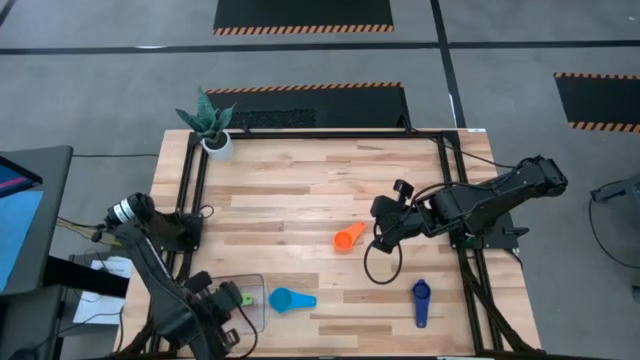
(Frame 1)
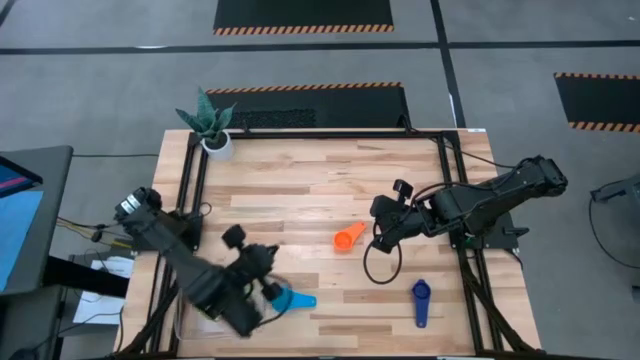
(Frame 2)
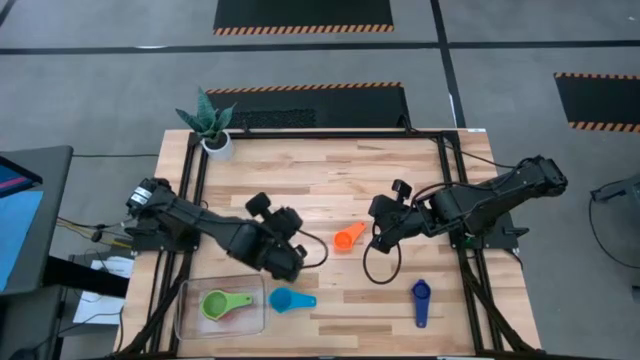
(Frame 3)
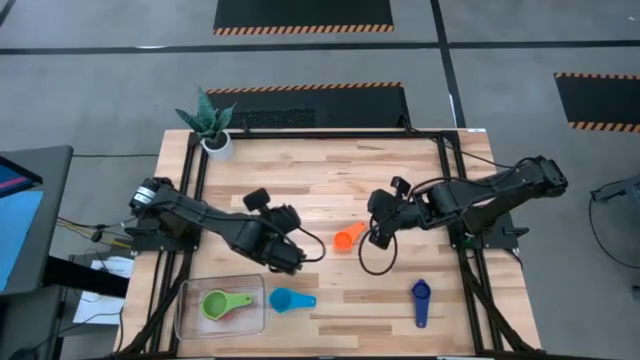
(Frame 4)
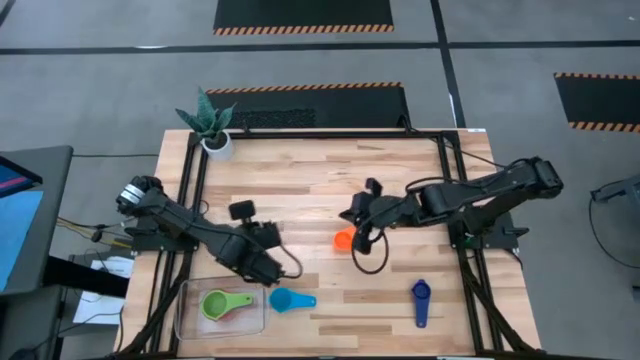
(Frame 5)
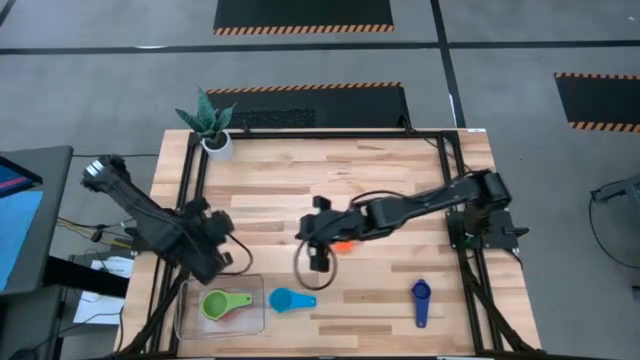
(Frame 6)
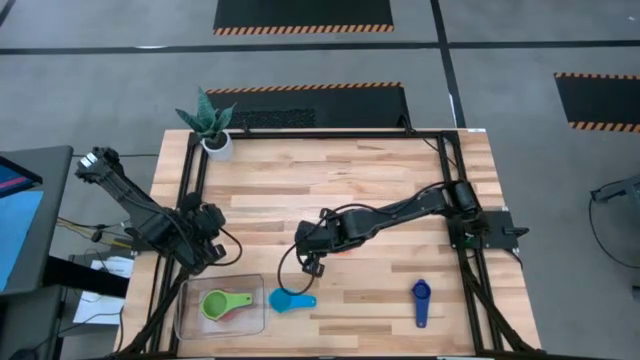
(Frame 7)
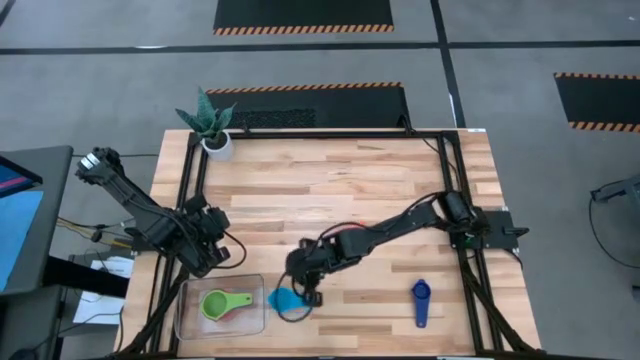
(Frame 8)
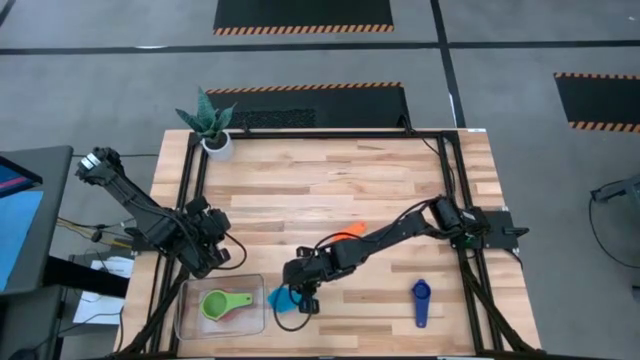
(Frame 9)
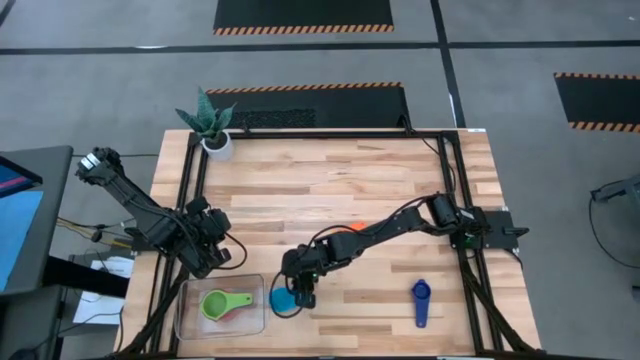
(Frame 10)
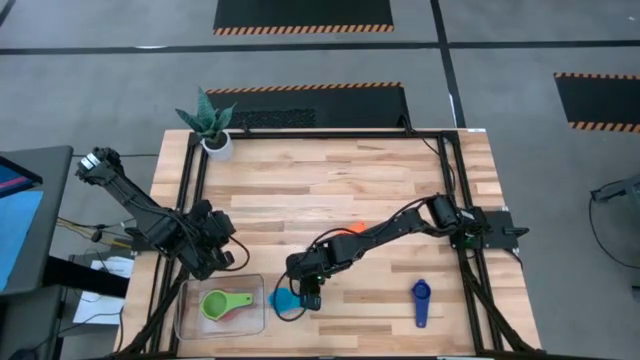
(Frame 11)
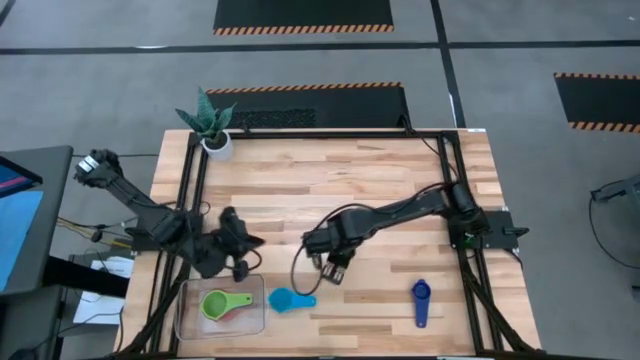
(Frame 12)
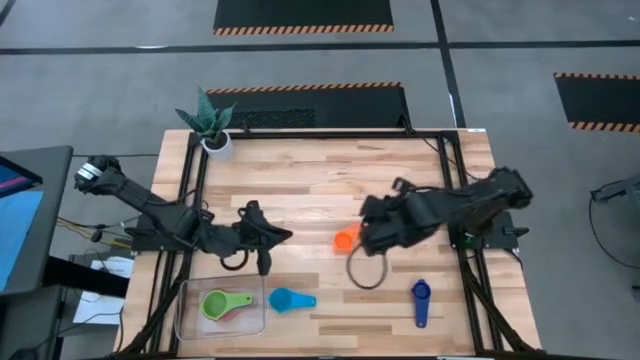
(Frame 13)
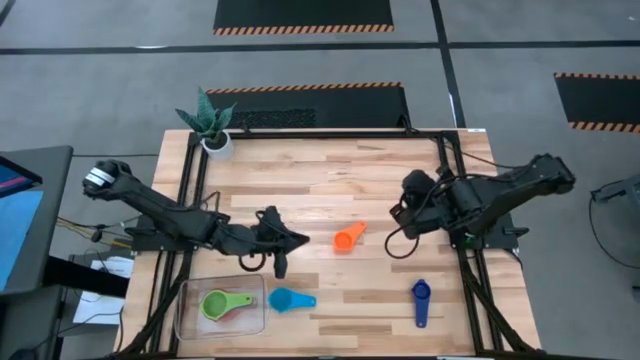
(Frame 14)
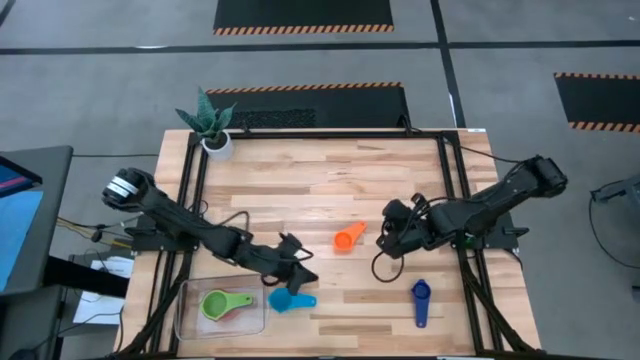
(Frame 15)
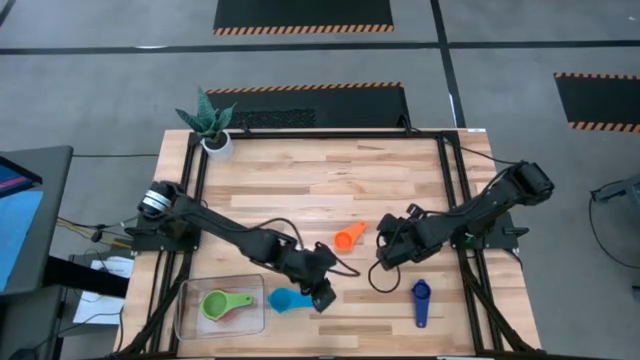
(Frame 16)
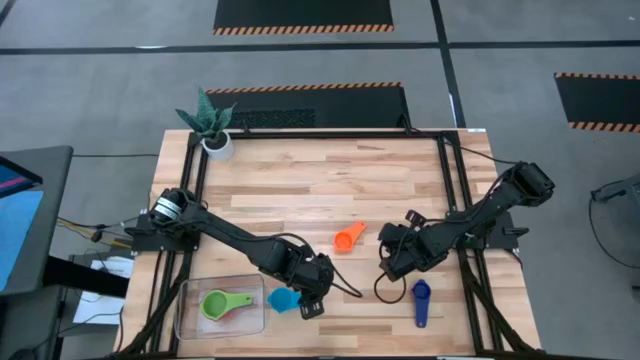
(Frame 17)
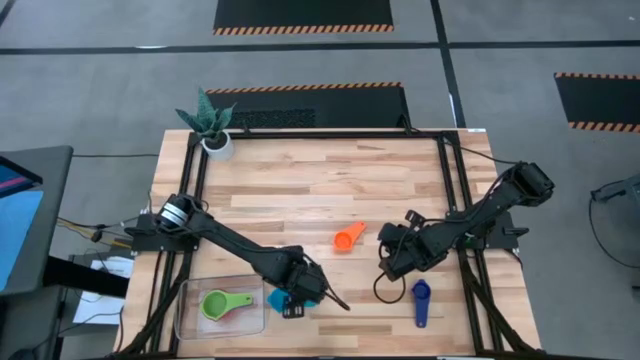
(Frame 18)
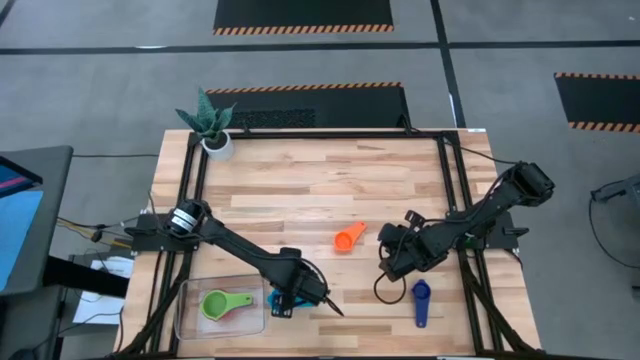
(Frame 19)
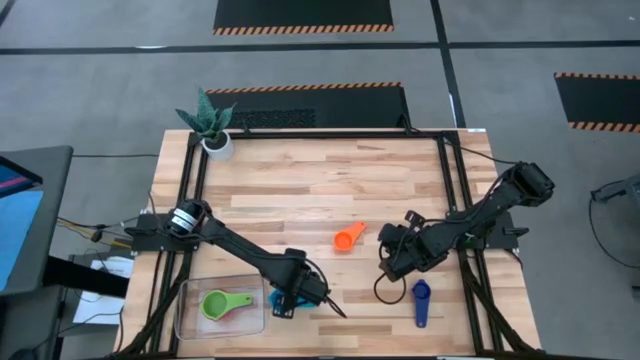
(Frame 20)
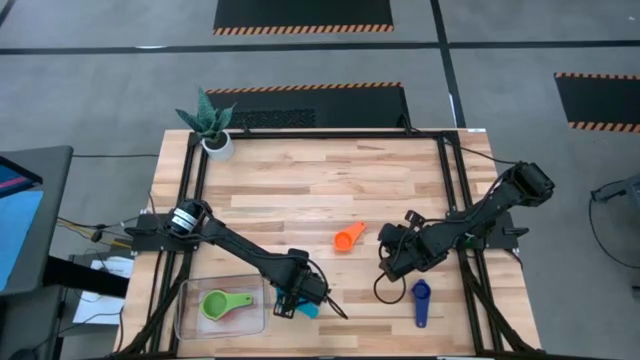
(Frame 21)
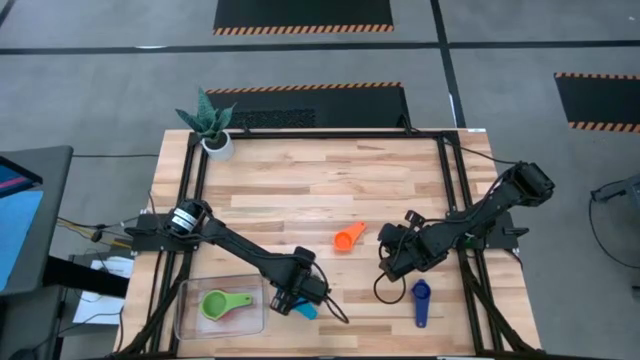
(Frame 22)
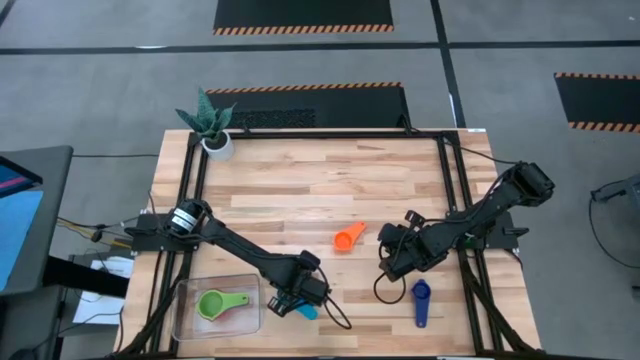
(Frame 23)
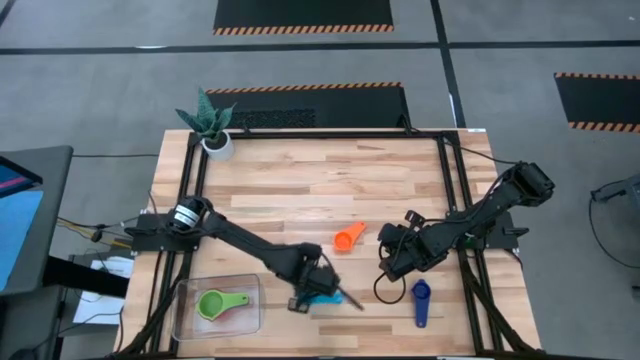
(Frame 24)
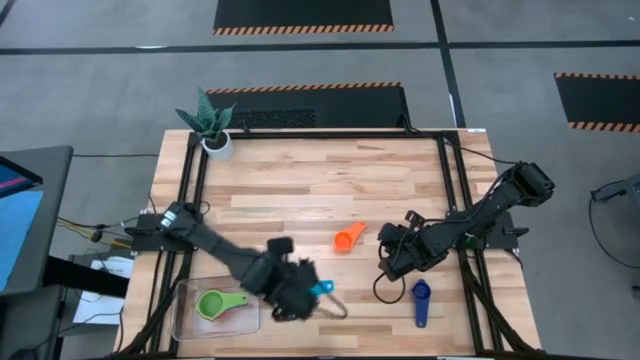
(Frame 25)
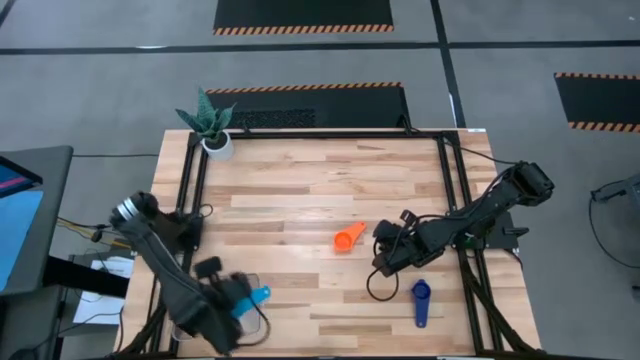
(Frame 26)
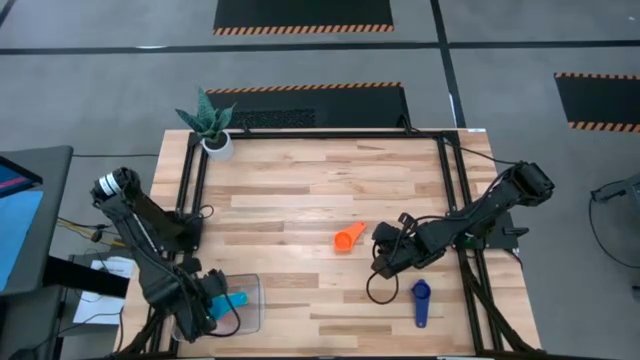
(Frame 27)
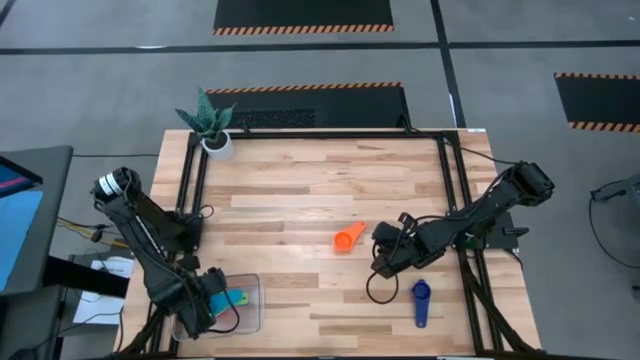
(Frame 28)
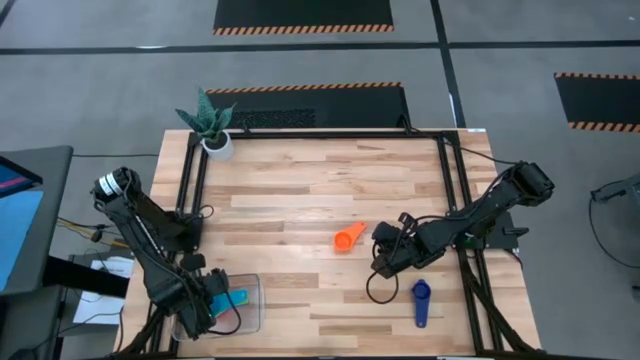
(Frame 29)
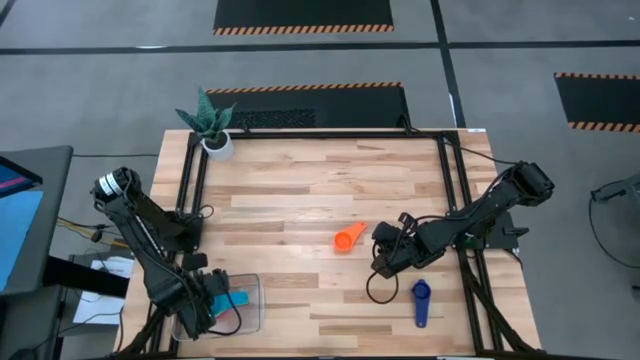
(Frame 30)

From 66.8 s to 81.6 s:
Task: Nest measuring cups in basket
Stack the light blue measuring cup on top of the green measuring cup in the transparent bin

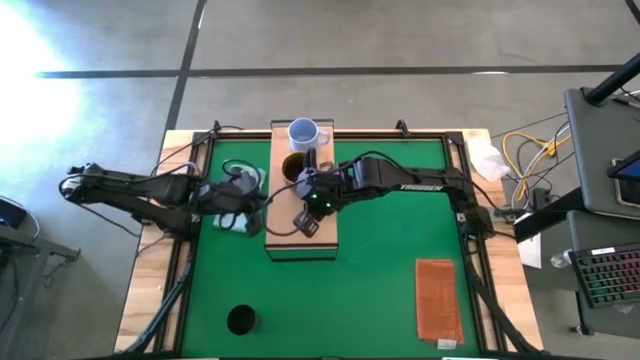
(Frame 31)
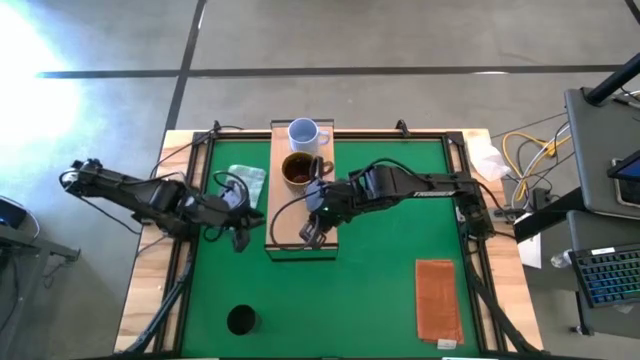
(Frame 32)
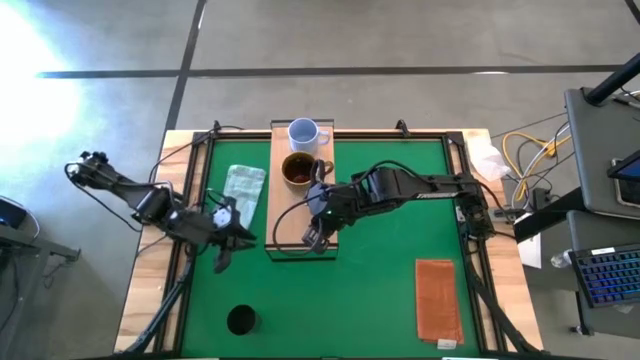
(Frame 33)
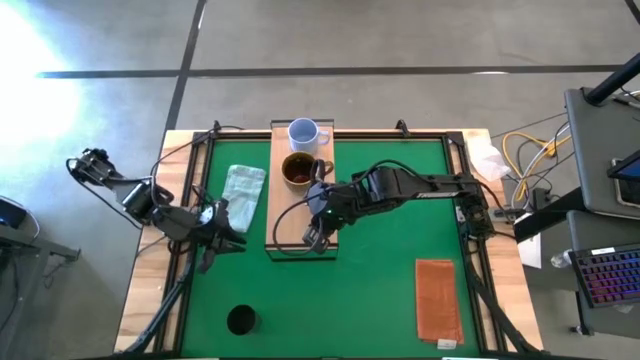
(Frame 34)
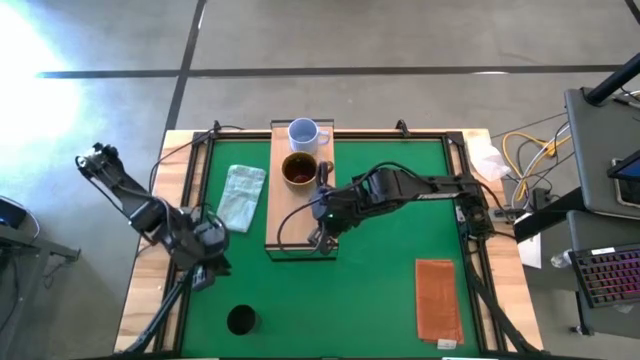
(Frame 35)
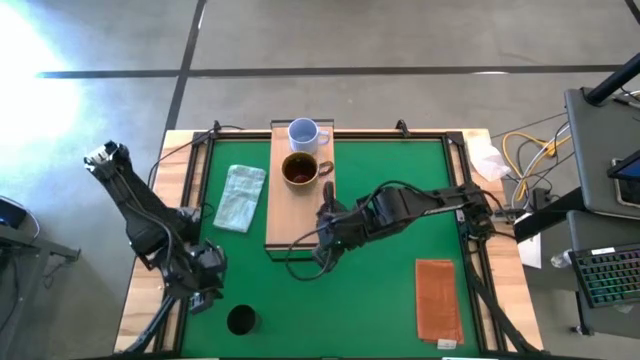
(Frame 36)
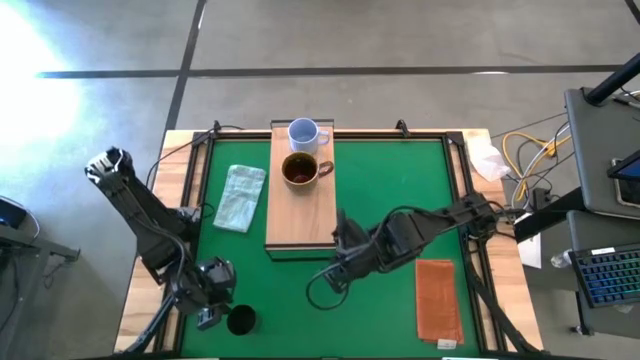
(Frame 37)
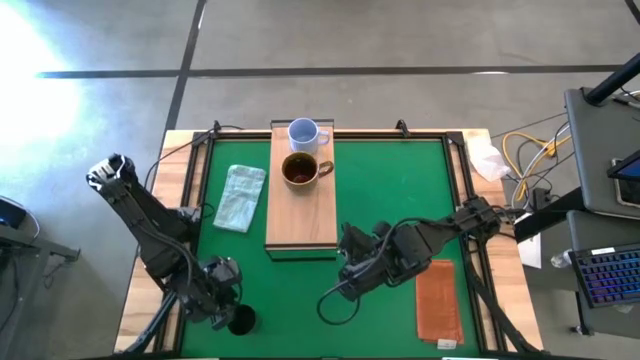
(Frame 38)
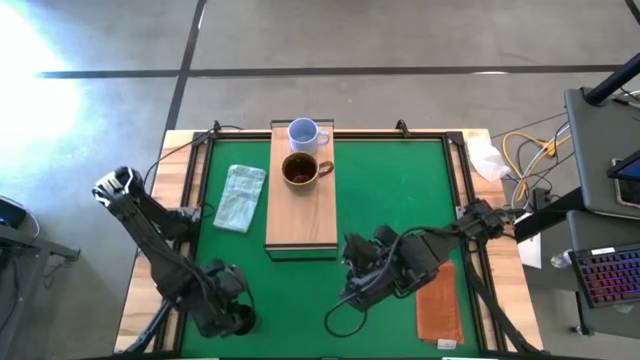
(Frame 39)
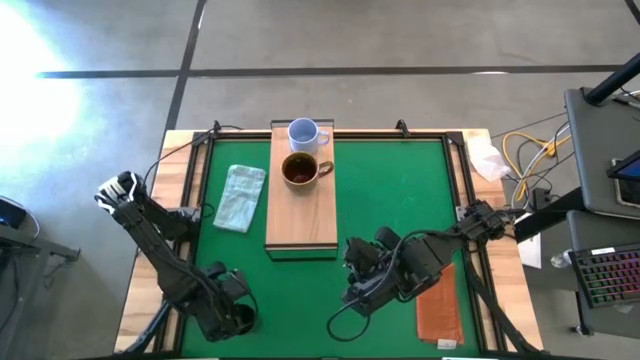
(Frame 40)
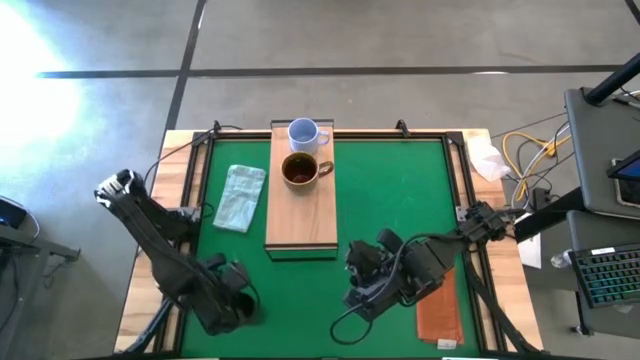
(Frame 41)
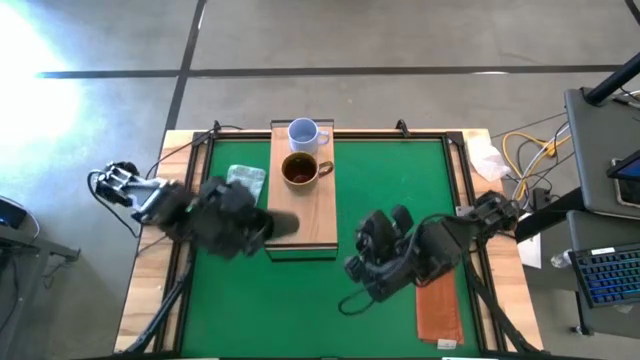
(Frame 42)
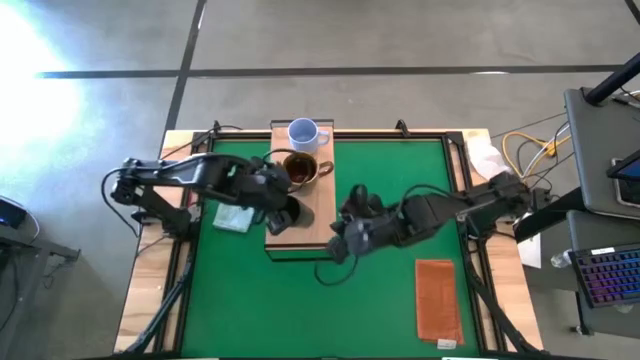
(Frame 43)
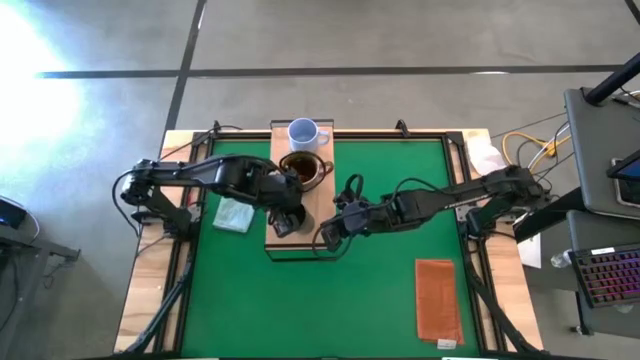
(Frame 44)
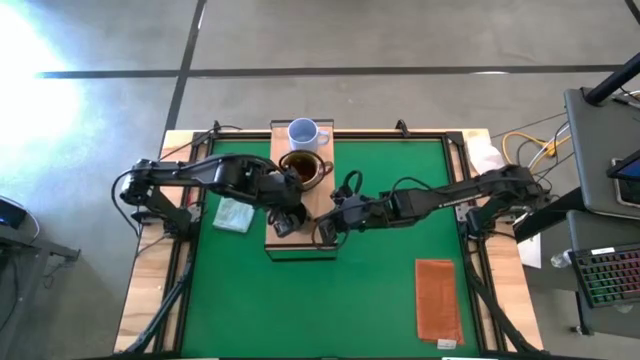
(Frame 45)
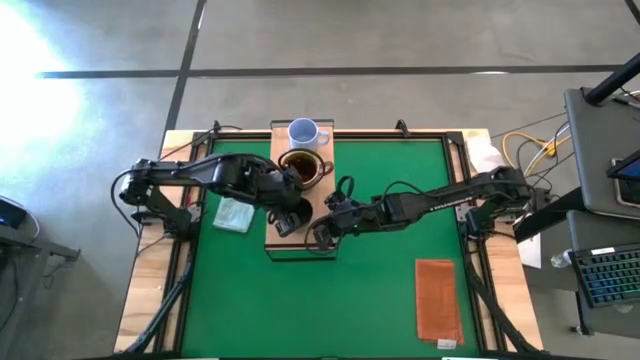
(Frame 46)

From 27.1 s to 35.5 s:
Task: Stack small to large cups/mugs on shelf
Put the black cup on the shelf
